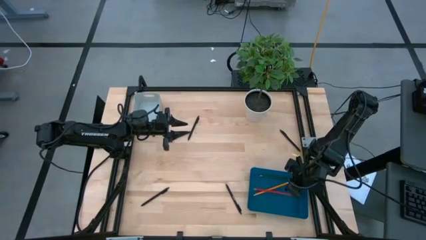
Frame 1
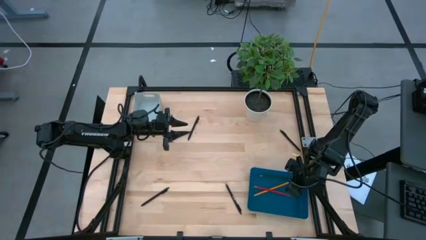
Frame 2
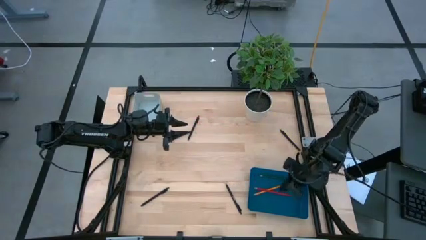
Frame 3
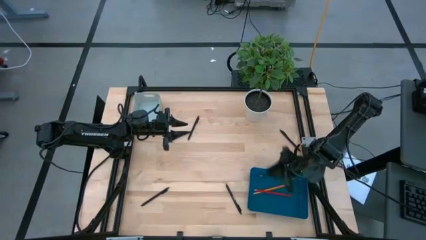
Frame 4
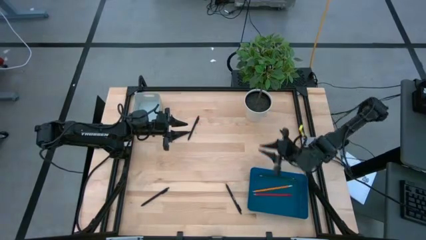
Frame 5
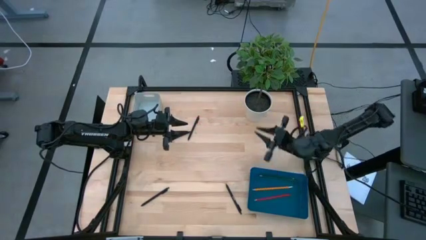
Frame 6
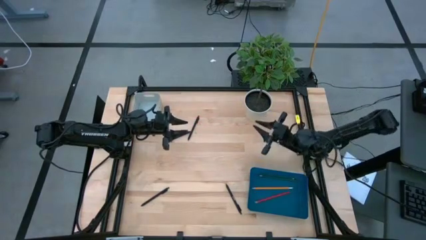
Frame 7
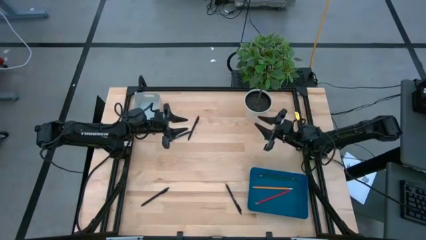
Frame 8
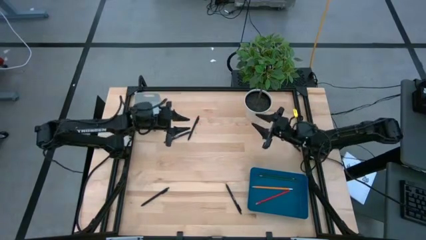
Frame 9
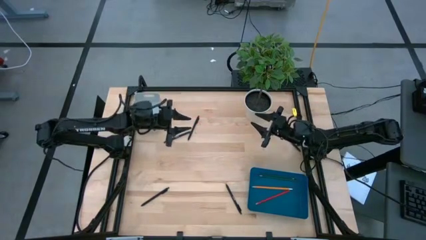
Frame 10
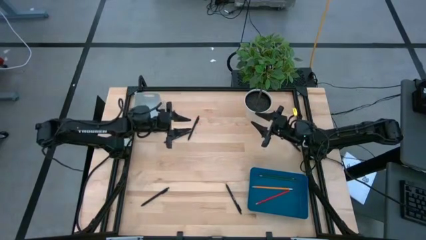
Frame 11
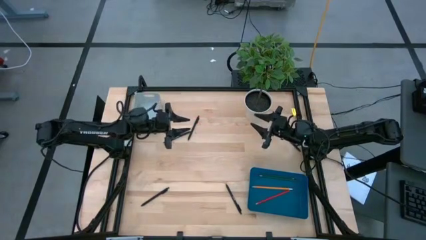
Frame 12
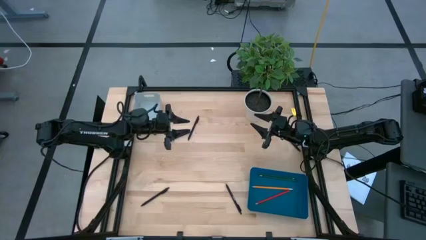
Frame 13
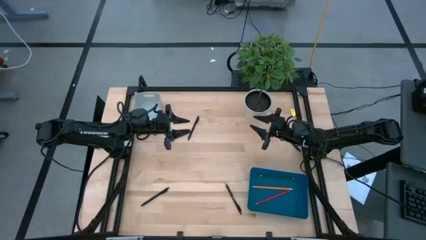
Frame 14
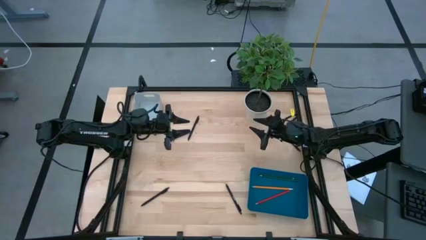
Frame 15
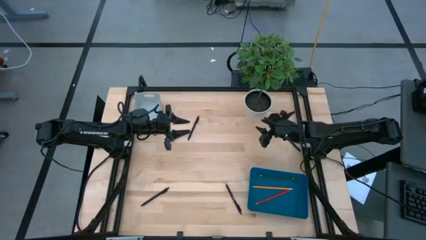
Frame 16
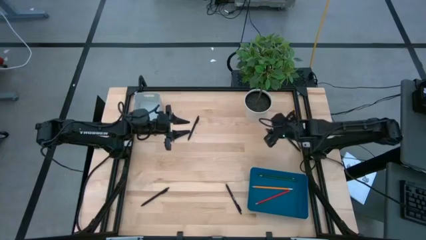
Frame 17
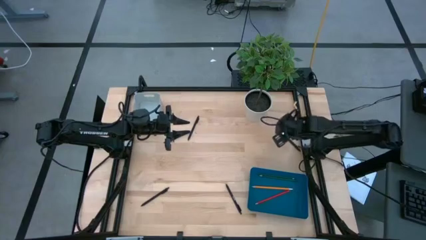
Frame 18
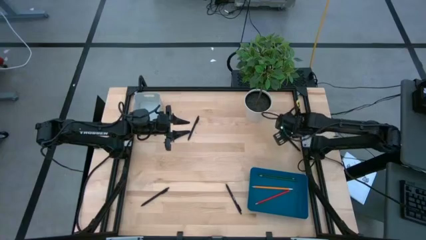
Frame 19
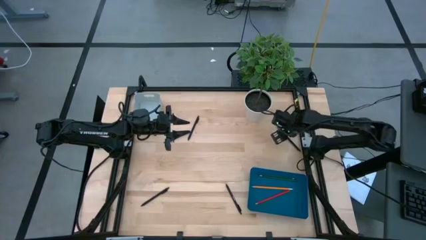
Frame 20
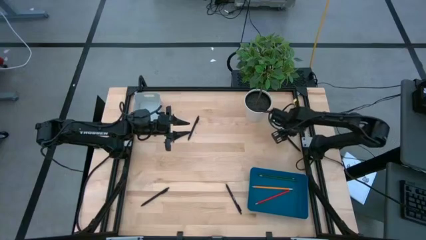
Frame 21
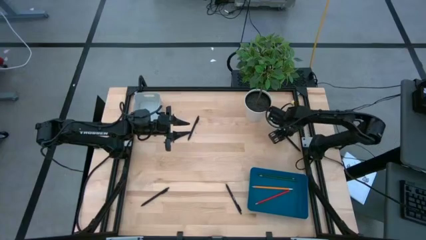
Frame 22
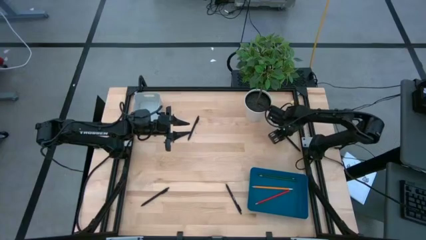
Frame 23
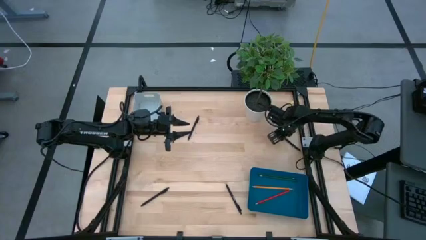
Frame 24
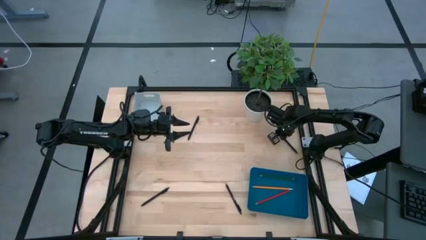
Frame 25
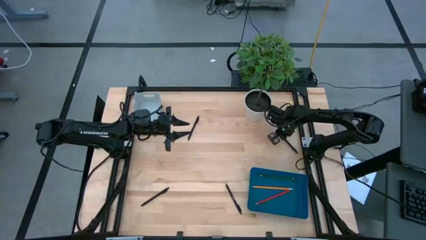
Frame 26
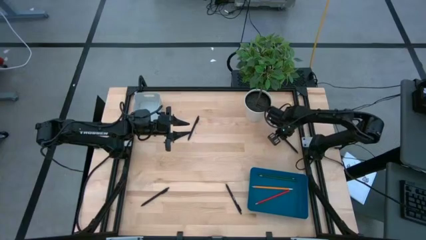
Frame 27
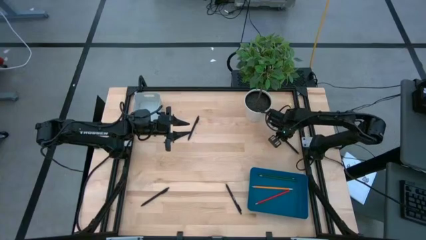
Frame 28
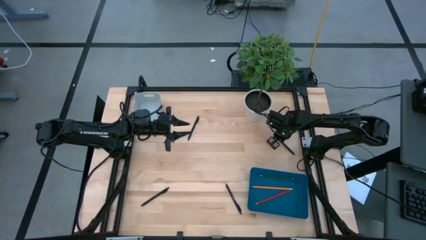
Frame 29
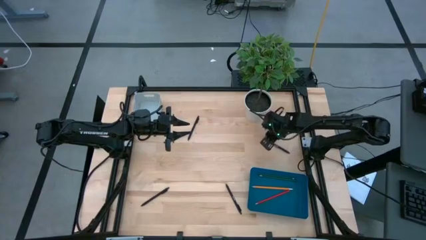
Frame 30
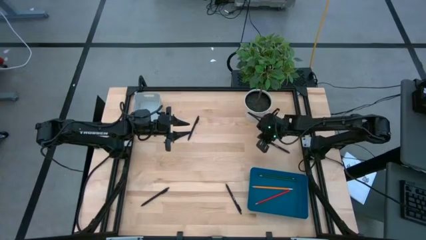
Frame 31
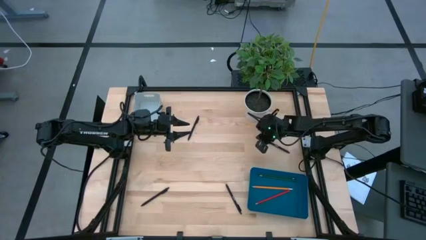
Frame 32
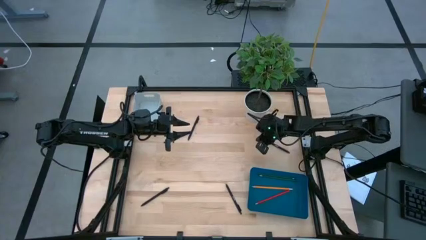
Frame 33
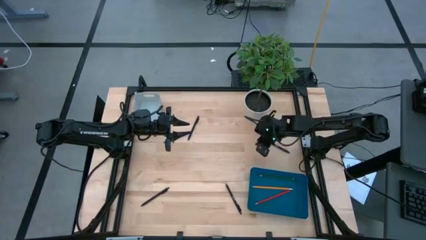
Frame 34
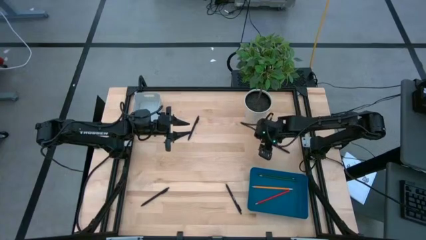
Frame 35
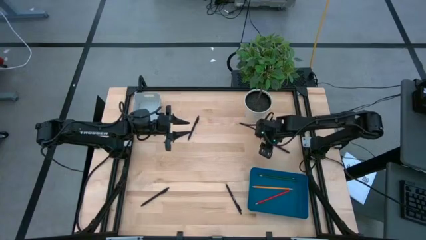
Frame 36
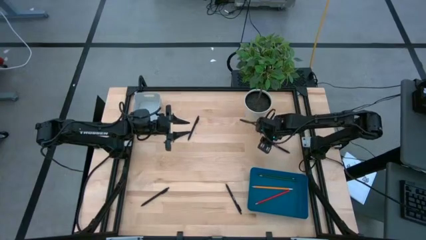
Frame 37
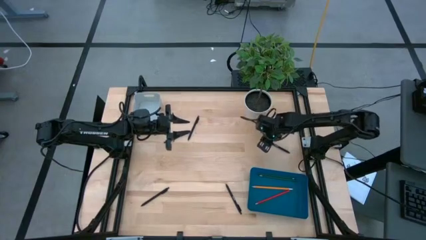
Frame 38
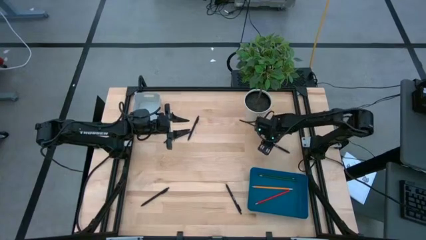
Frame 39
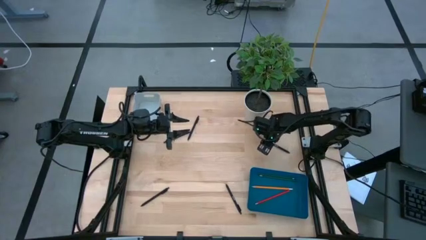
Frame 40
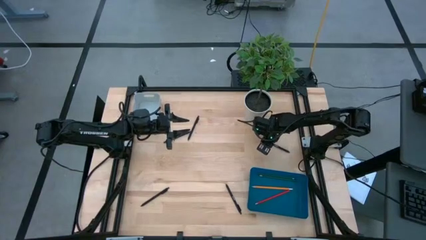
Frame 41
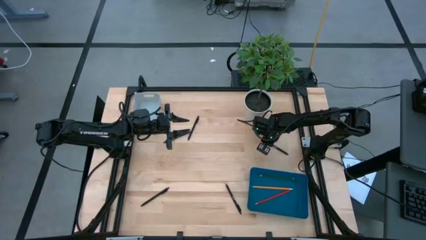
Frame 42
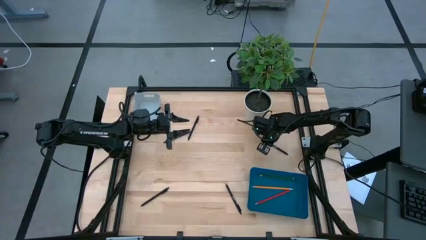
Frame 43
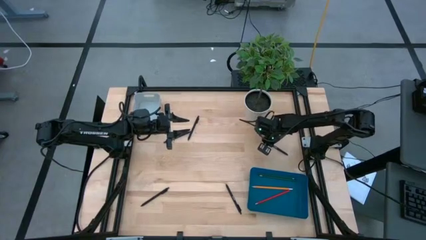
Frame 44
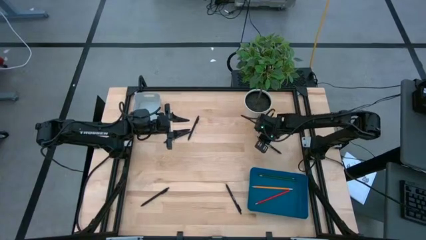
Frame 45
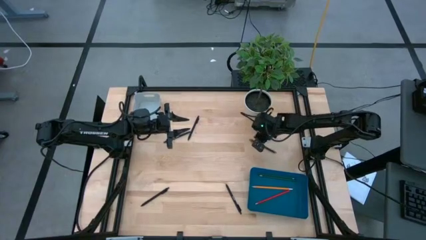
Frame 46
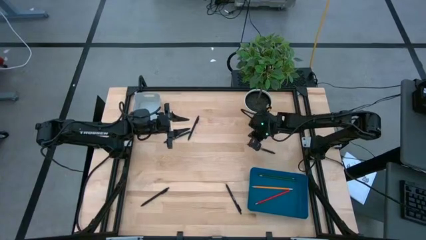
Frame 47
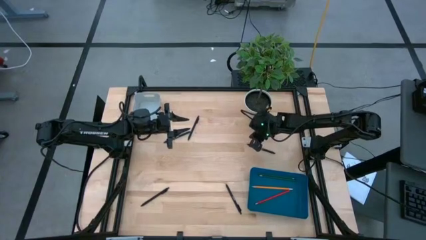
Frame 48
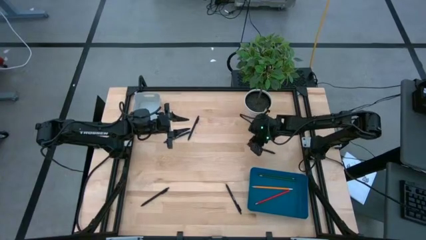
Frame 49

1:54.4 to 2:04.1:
Task: Sort pens & pencils
Put the black pen into the white bin

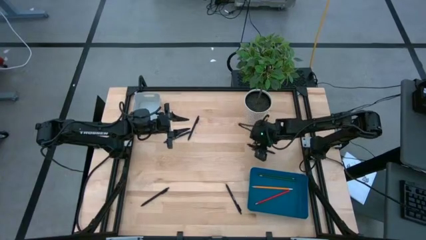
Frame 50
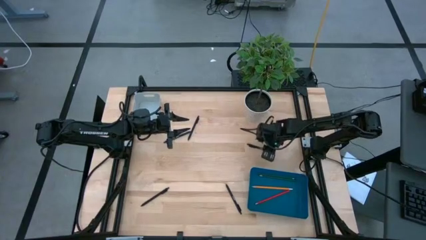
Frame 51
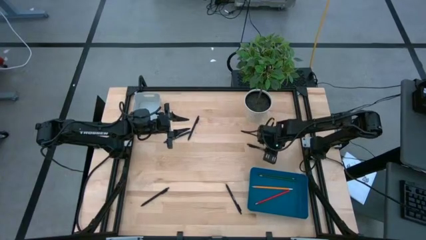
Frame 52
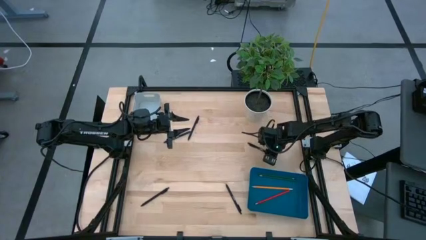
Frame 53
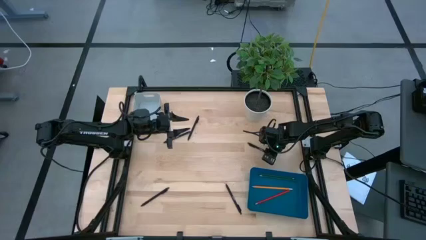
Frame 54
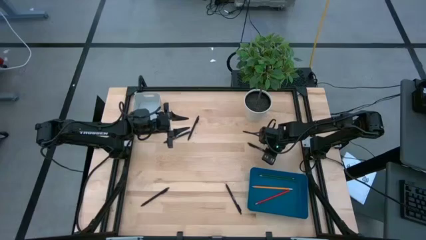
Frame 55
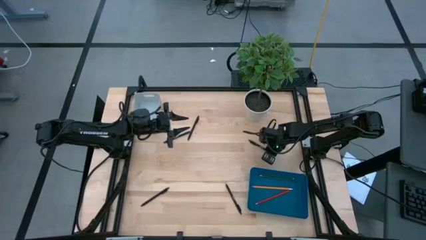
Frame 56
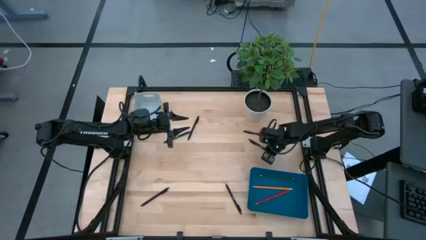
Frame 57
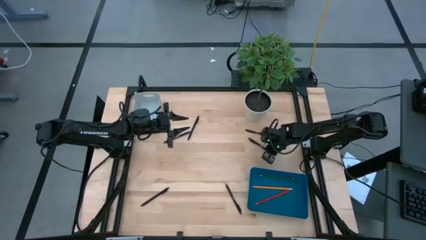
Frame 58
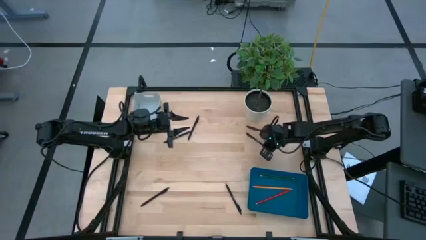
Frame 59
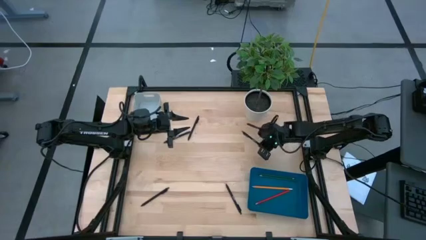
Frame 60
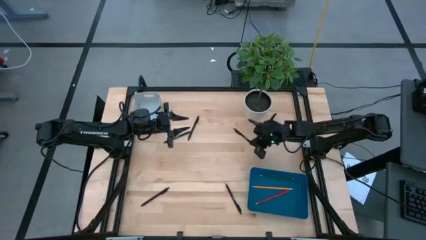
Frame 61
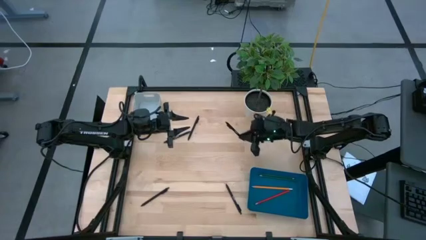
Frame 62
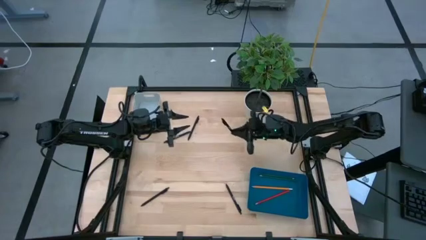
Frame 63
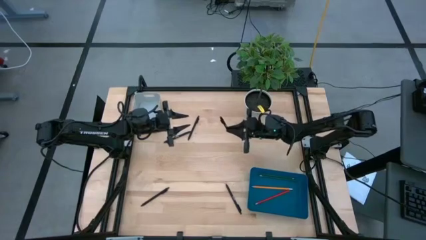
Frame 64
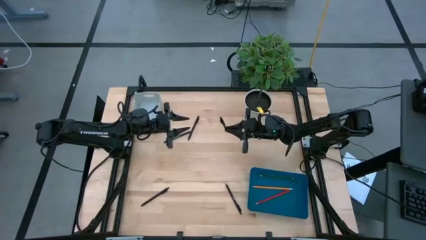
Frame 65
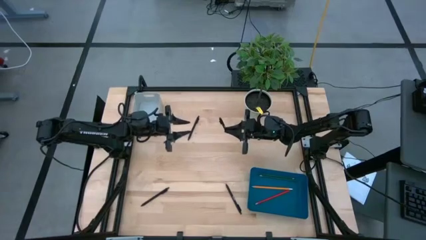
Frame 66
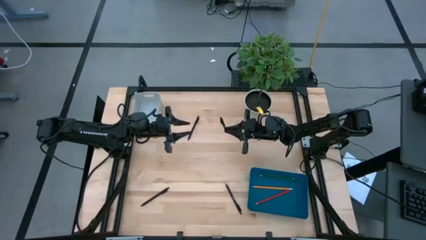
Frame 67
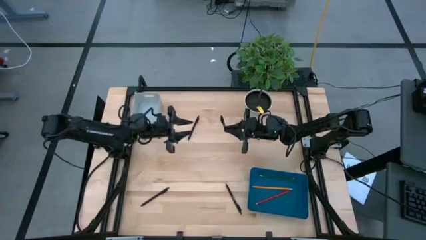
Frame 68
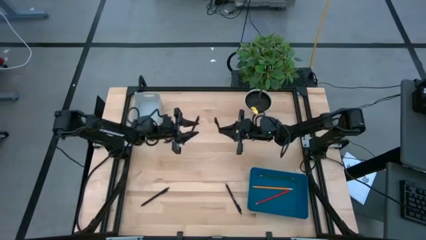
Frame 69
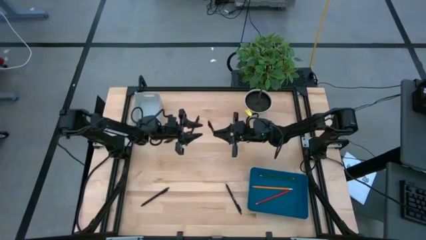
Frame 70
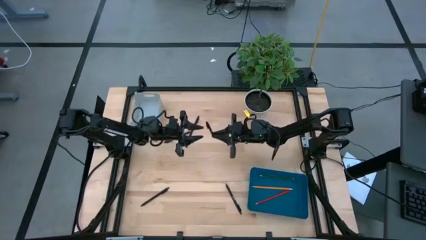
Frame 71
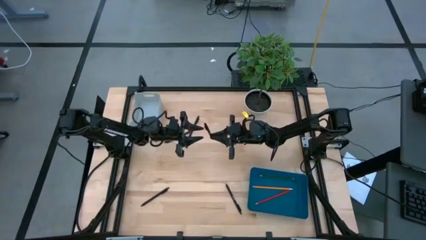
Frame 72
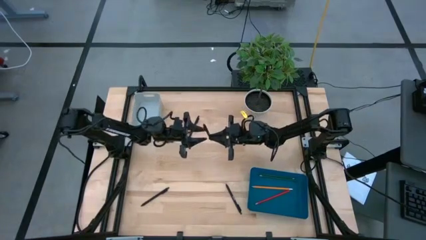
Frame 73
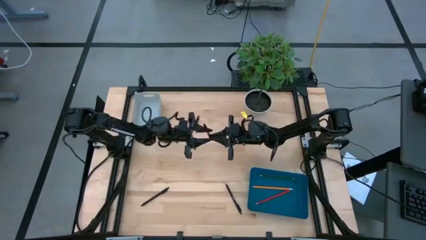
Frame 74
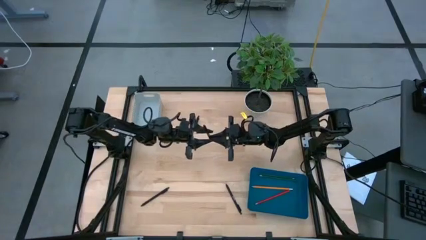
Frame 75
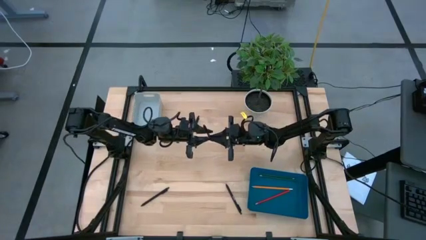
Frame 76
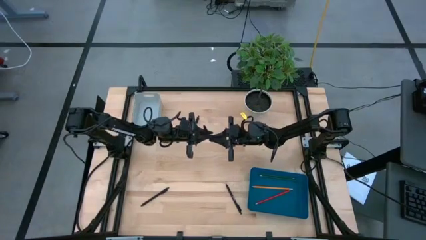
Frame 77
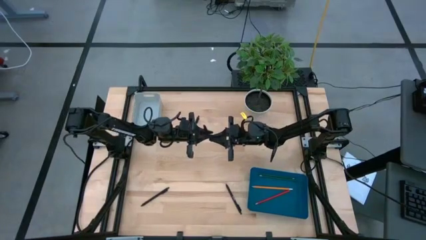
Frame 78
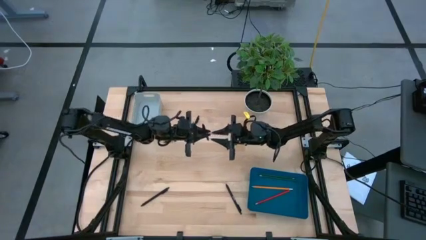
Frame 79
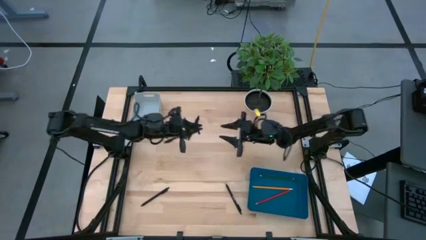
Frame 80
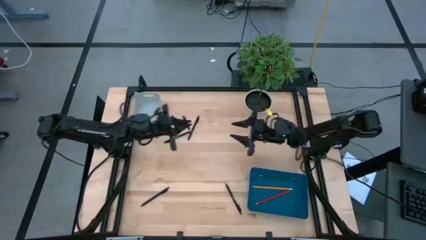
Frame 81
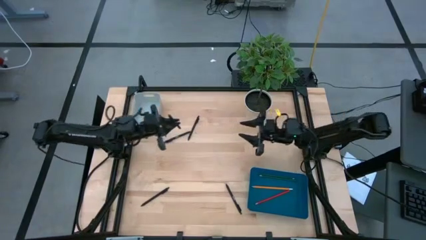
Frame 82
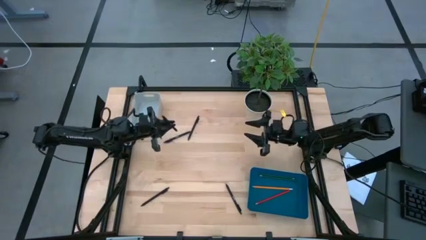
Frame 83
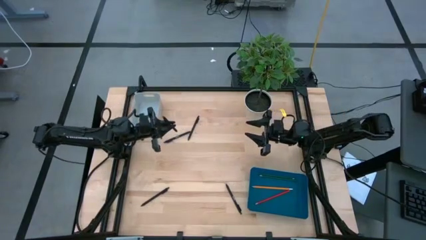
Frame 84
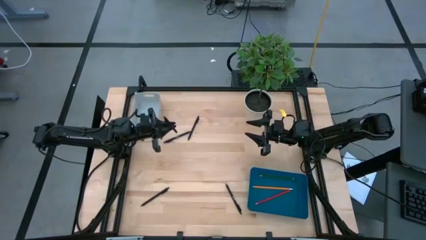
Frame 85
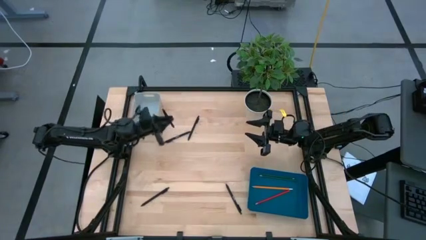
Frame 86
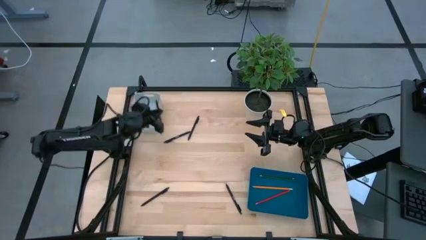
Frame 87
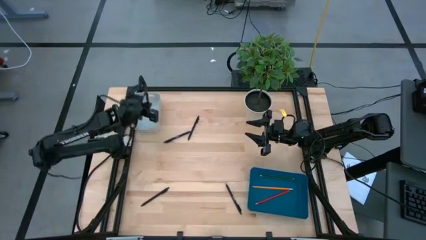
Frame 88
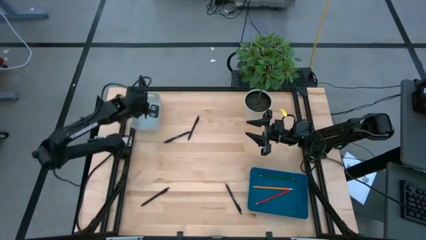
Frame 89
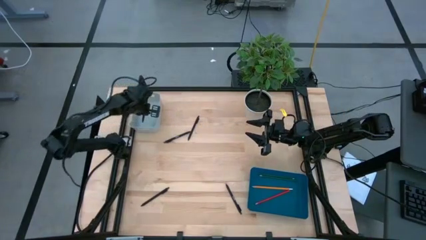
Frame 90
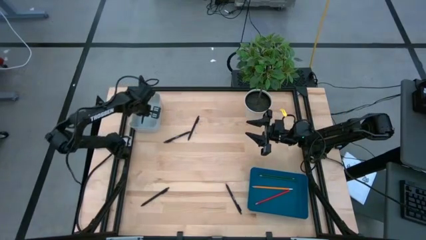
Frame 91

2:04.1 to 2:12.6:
Put the black pen into the white bin
